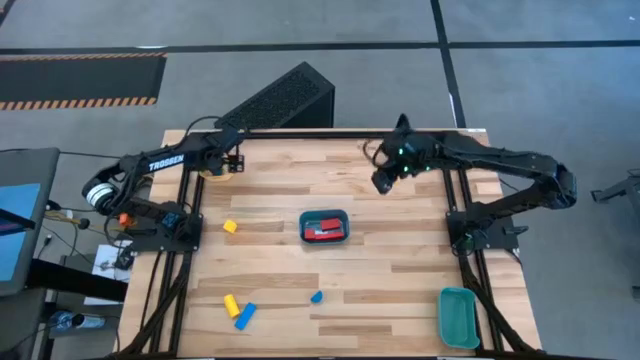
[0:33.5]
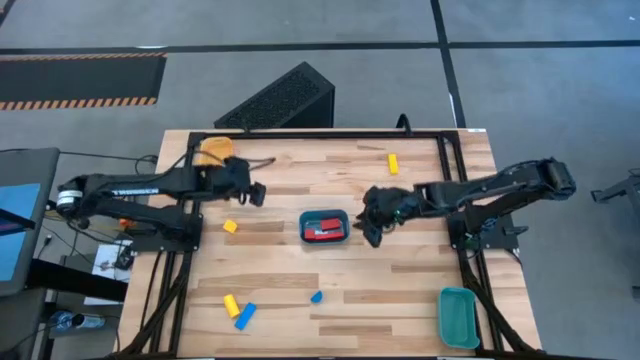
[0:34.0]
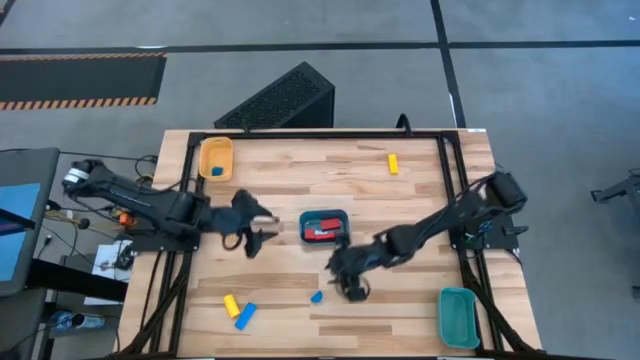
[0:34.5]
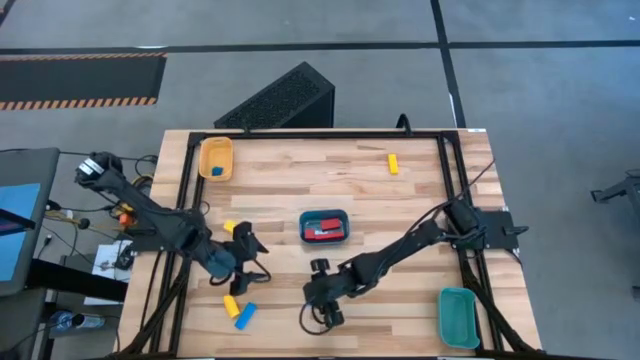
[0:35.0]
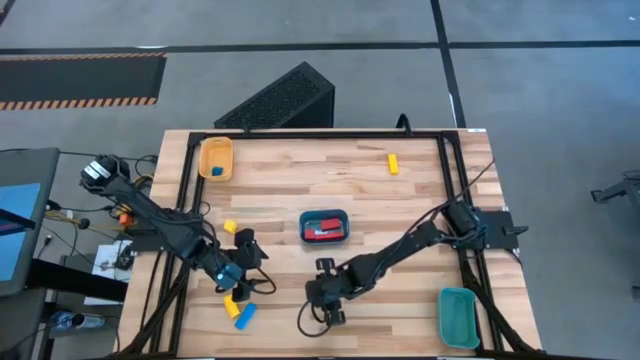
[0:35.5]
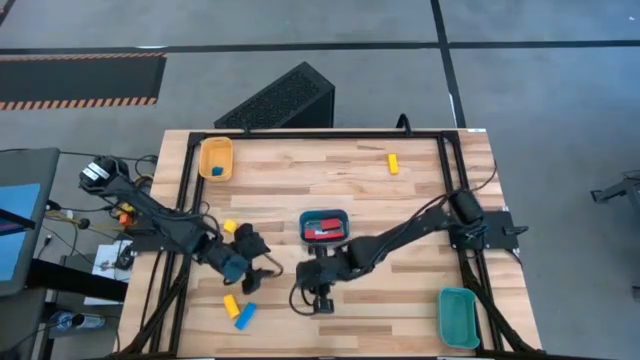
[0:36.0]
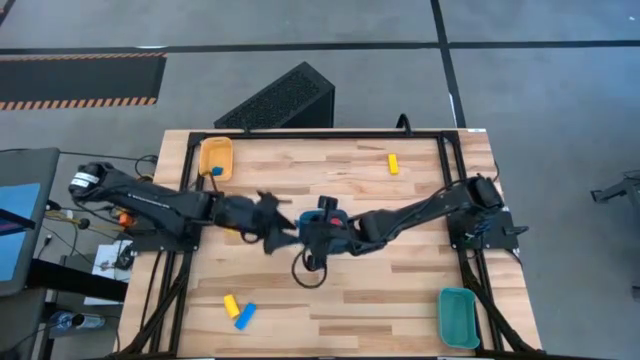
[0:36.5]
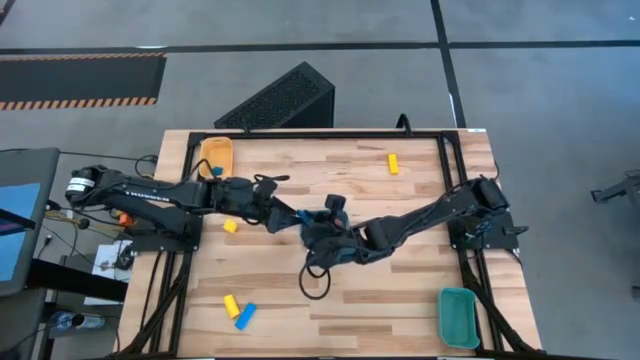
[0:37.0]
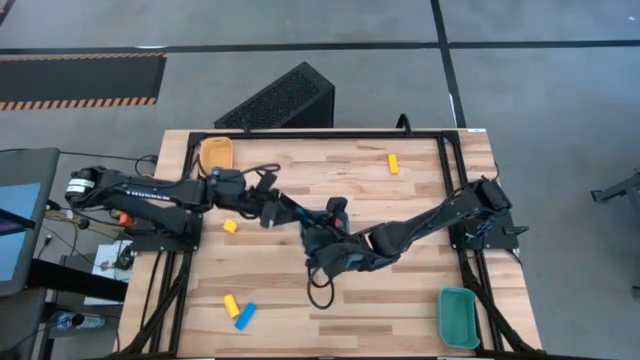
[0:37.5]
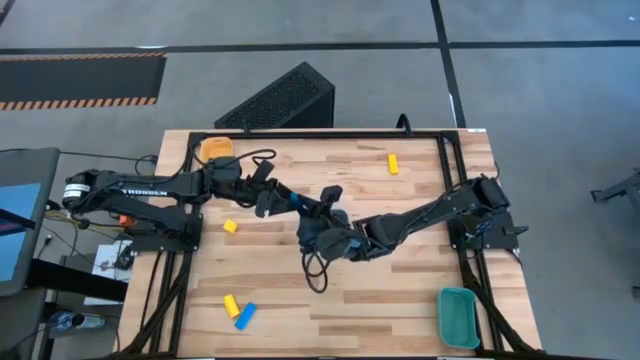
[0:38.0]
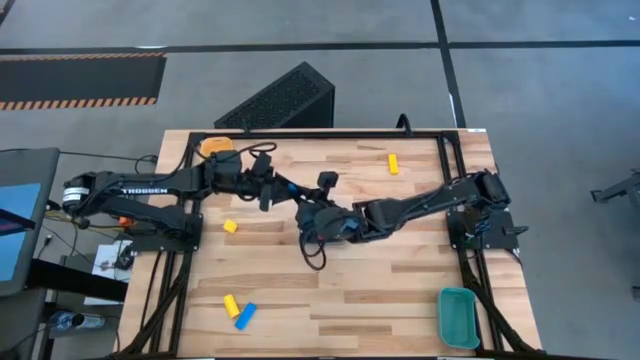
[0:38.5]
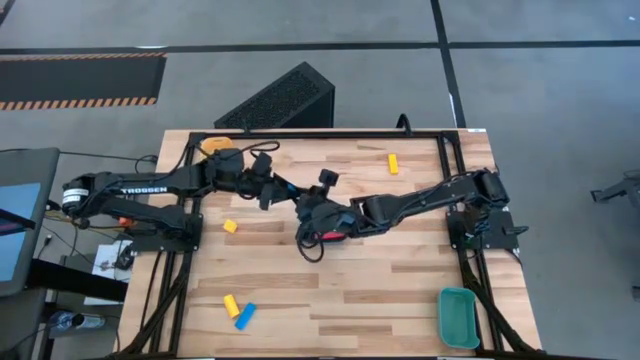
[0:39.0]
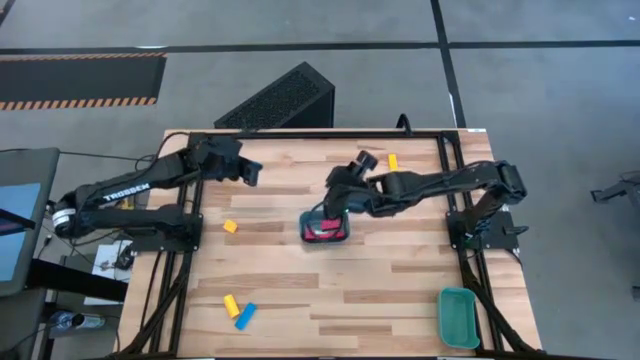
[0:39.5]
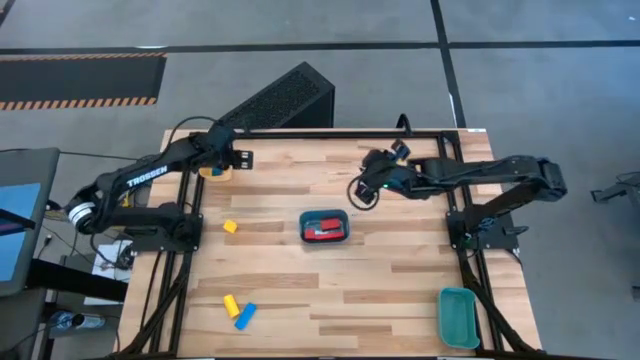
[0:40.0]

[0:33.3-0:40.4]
Task: Sort & place blocks by color
Put the right blue block into the yellow bin

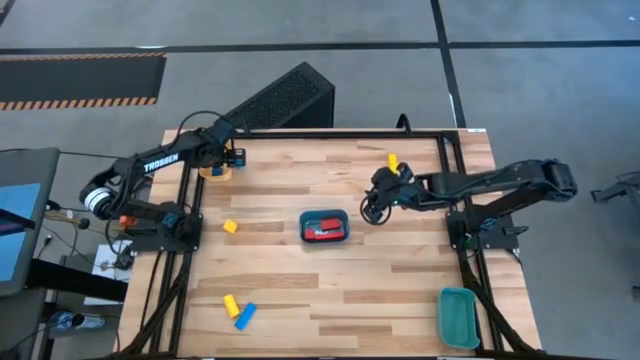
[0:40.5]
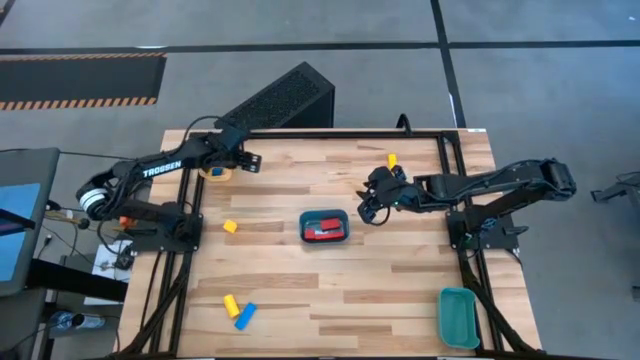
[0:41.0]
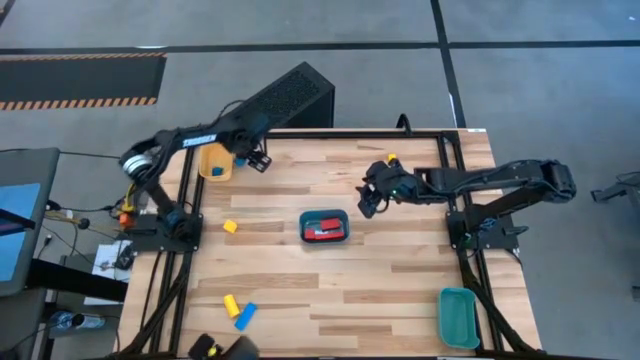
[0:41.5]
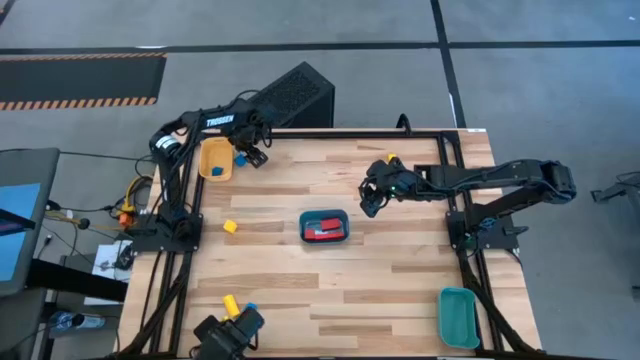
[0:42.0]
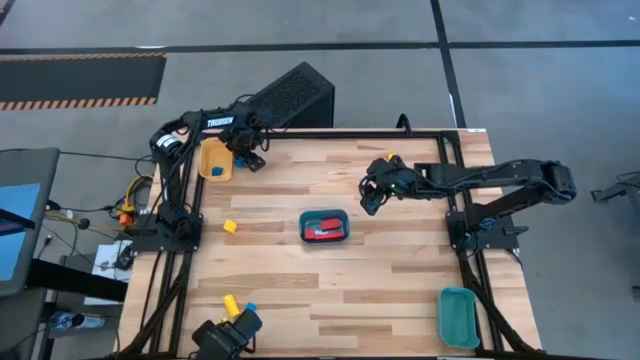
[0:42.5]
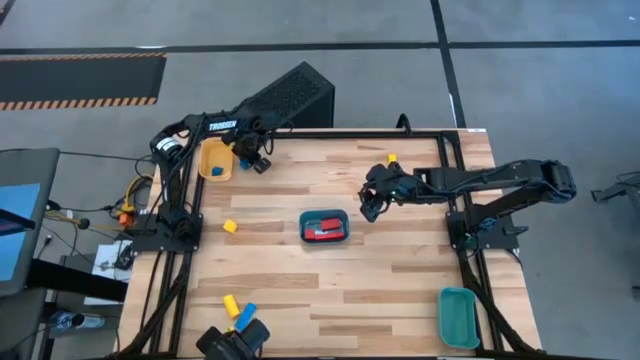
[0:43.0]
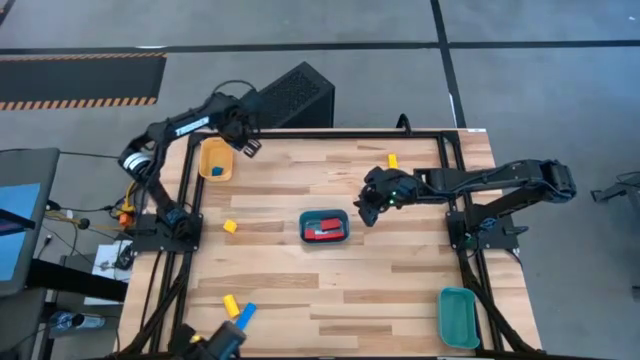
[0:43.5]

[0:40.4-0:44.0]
Put the top blue block into the yellow bin

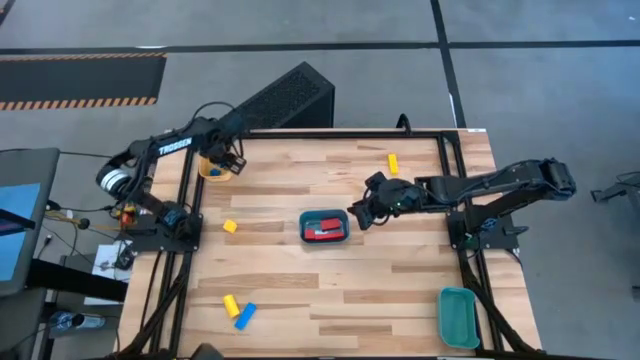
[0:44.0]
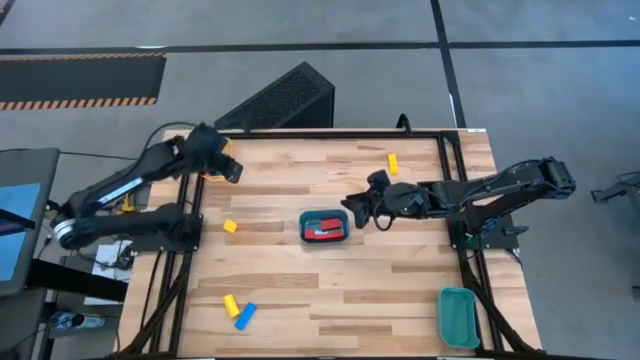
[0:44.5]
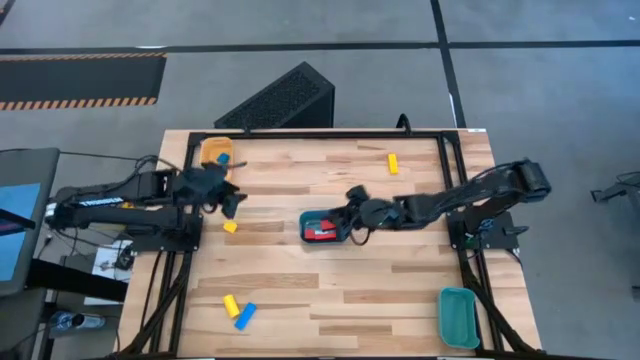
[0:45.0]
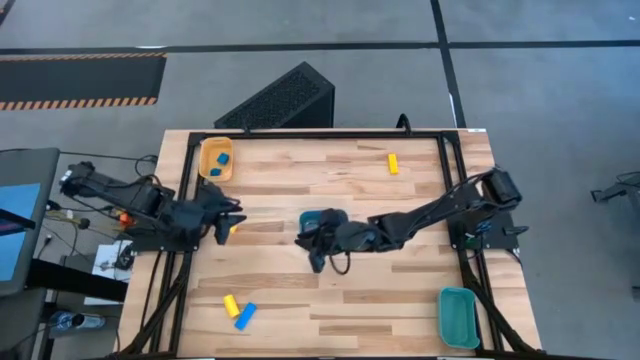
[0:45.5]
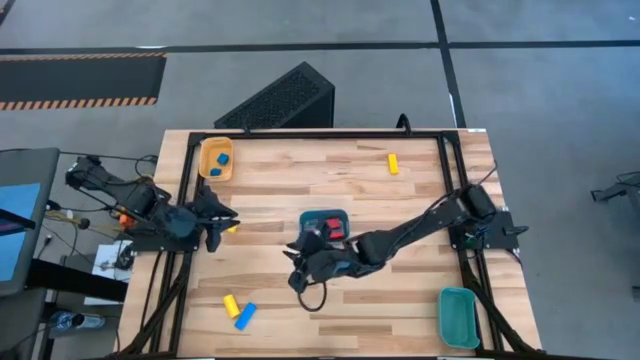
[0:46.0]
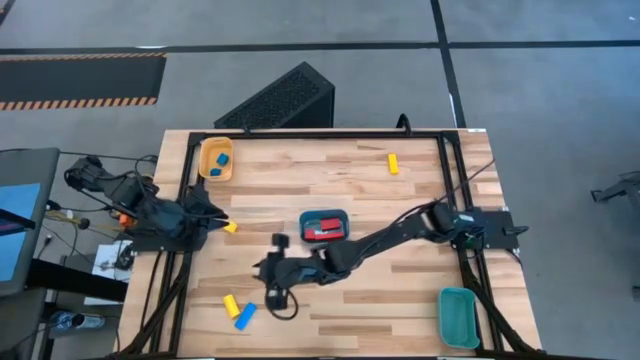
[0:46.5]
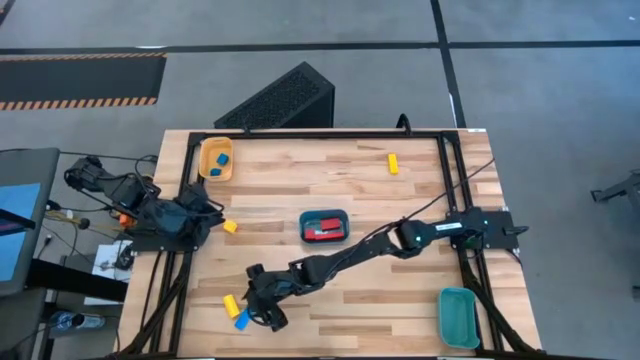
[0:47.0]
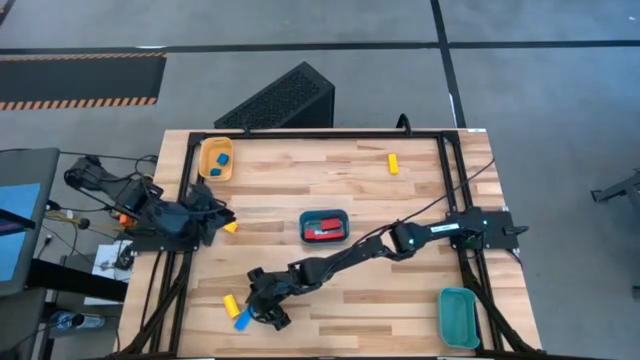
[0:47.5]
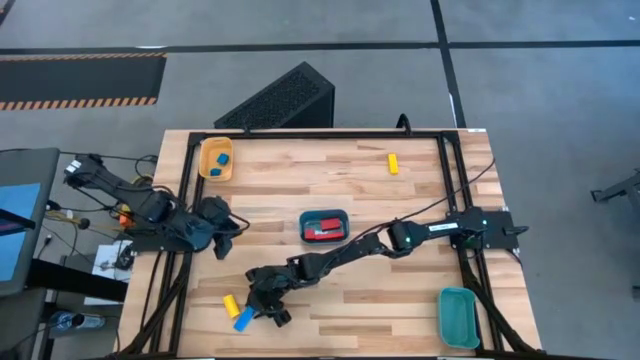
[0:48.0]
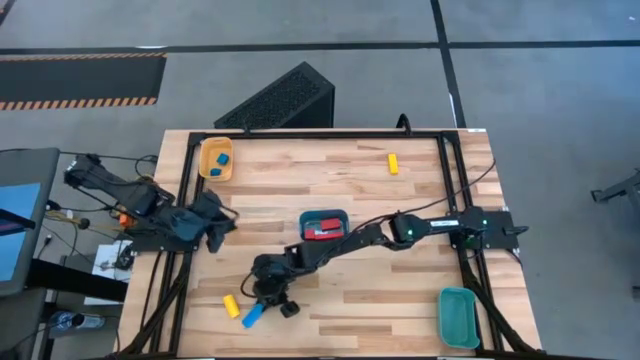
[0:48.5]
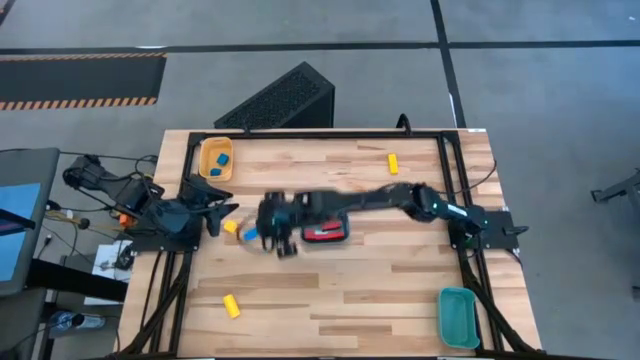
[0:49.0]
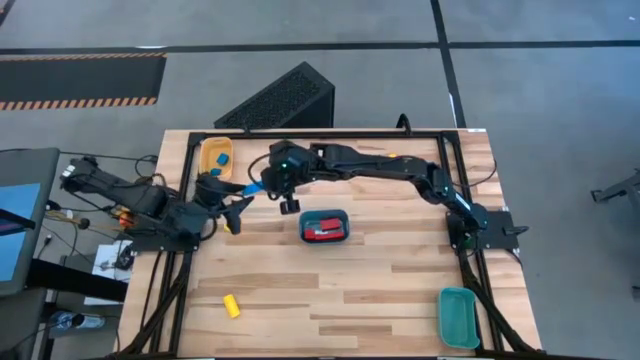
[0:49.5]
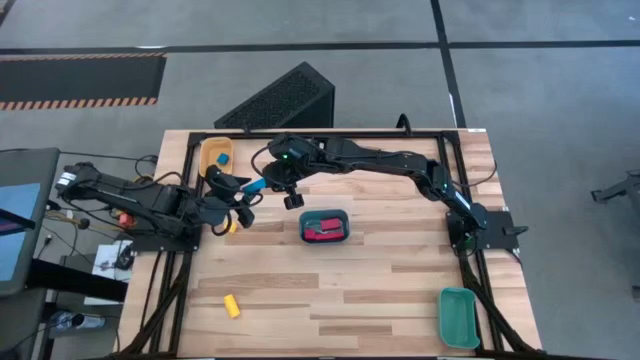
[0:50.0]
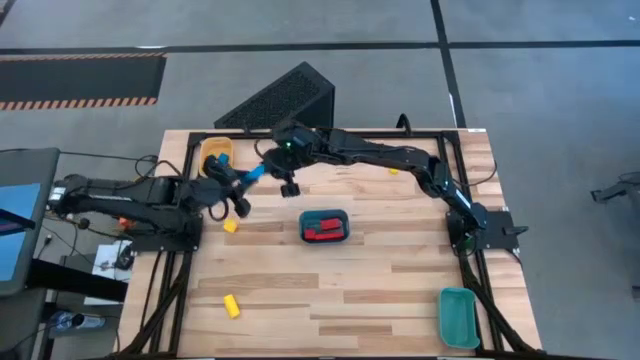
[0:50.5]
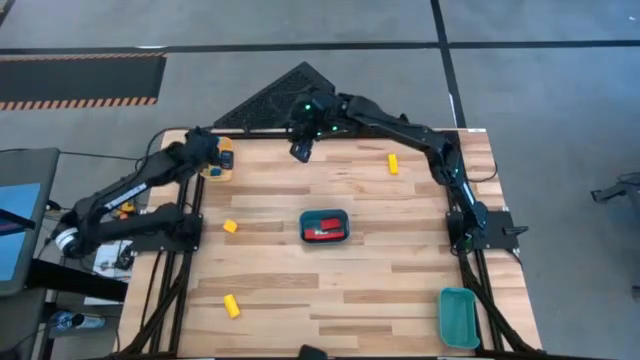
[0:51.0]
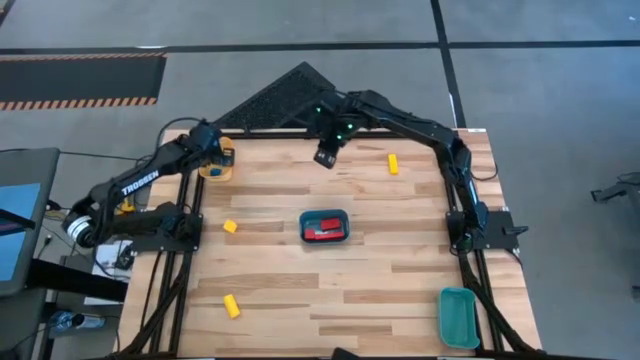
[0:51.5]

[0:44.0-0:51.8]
Put the blue block into the yellow bin

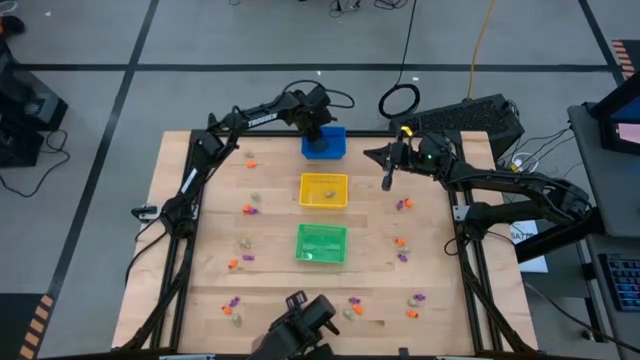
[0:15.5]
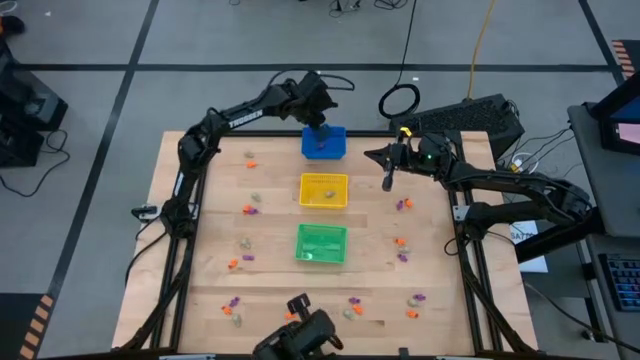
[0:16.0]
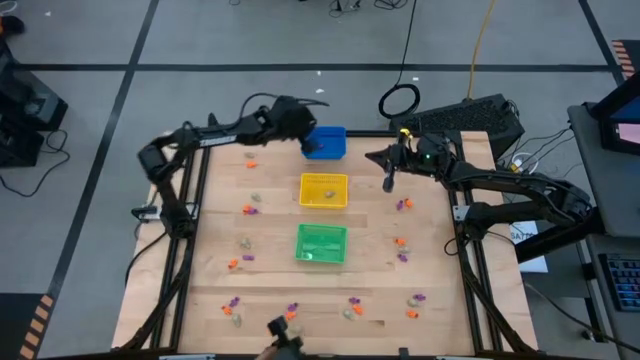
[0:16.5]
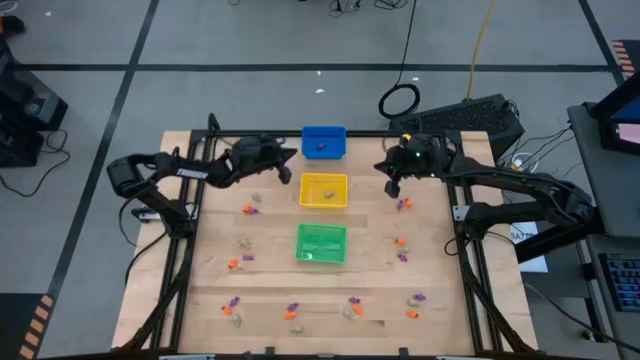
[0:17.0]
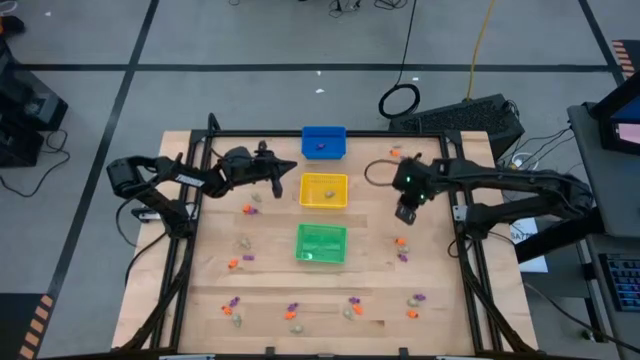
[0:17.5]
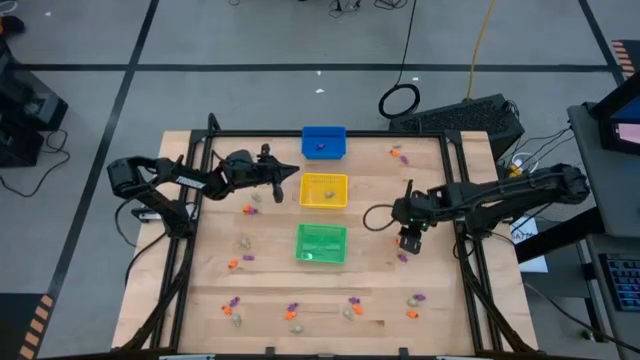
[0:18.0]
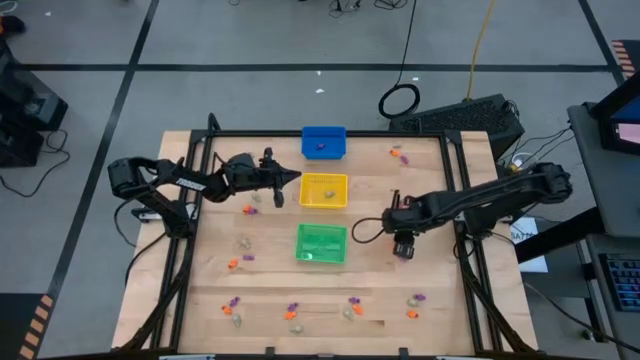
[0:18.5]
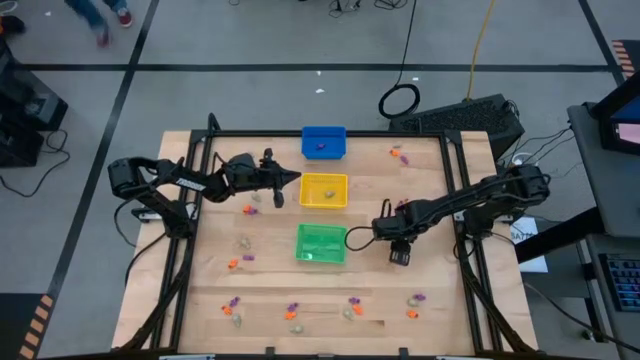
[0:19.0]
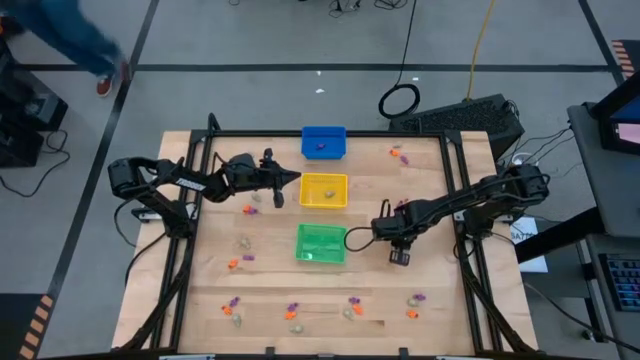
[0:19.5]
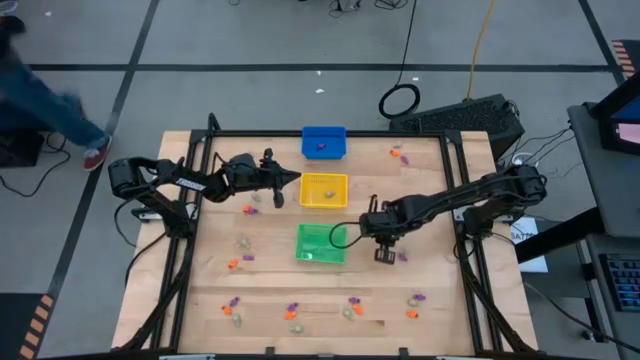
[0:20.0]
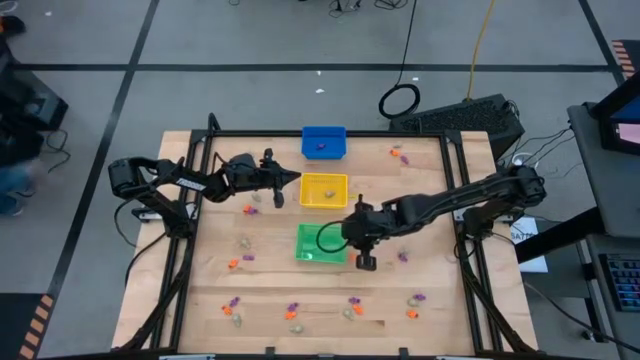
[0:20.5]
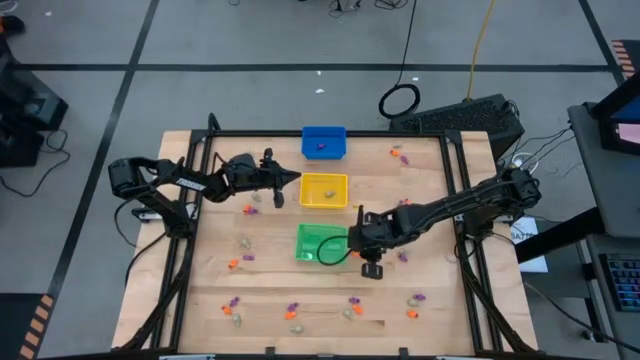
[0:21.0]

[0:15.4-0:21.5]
Task: Sort Halloween decoration
Put the orange skeleton toy into the green bin
